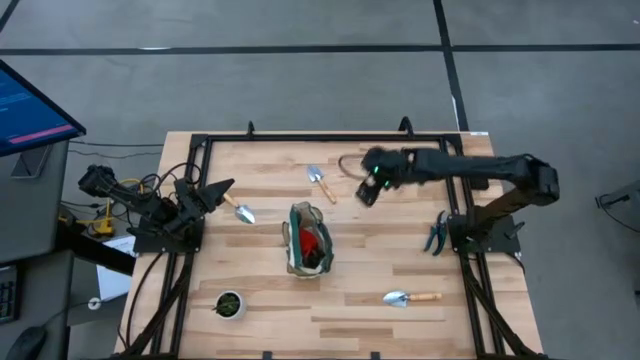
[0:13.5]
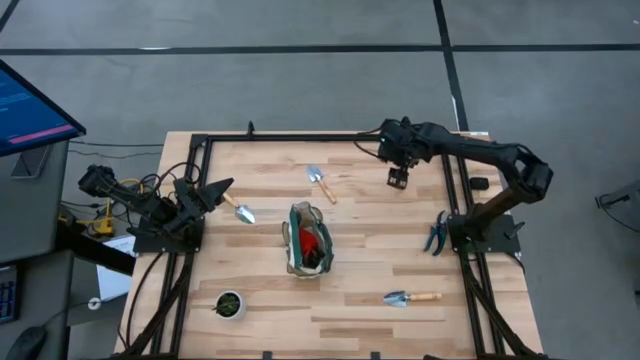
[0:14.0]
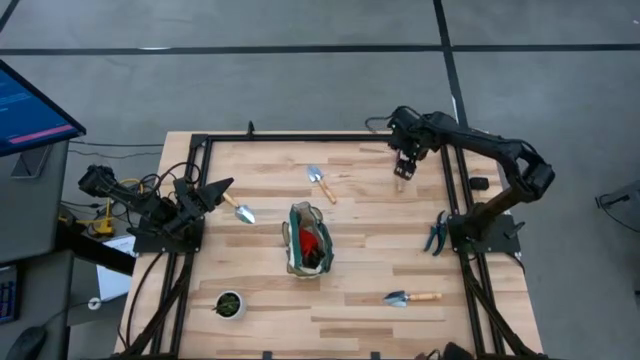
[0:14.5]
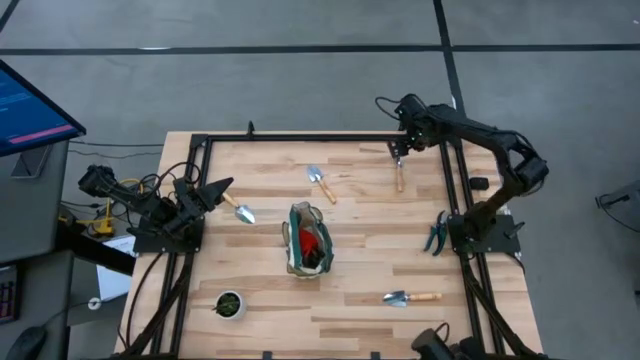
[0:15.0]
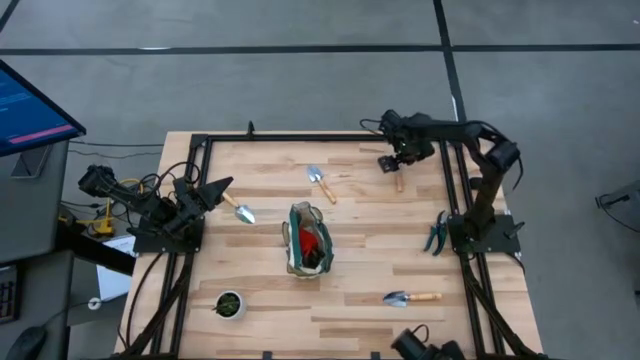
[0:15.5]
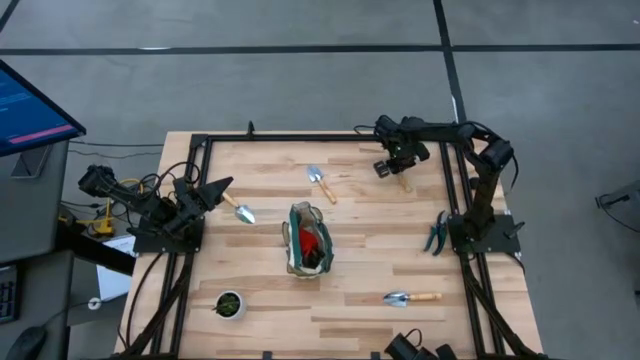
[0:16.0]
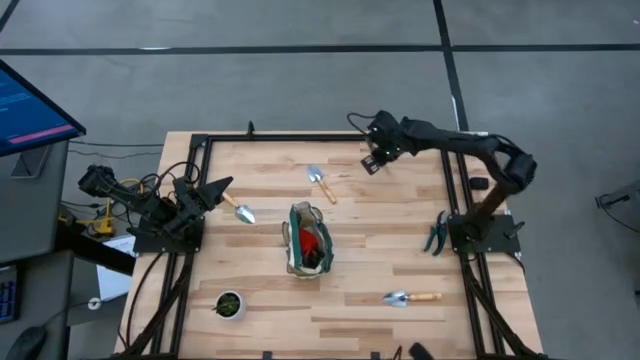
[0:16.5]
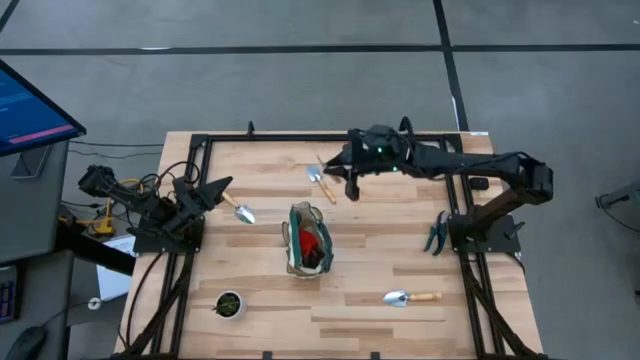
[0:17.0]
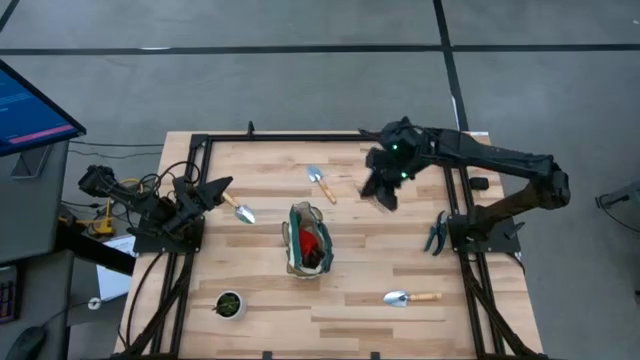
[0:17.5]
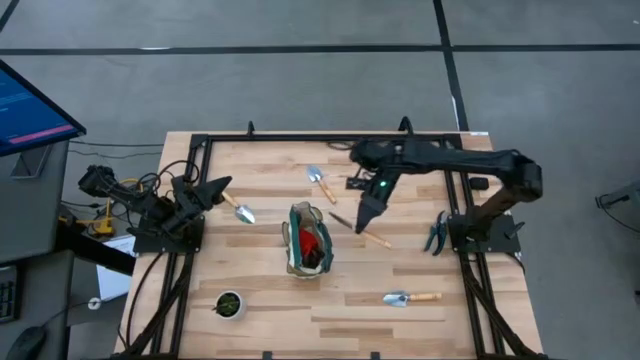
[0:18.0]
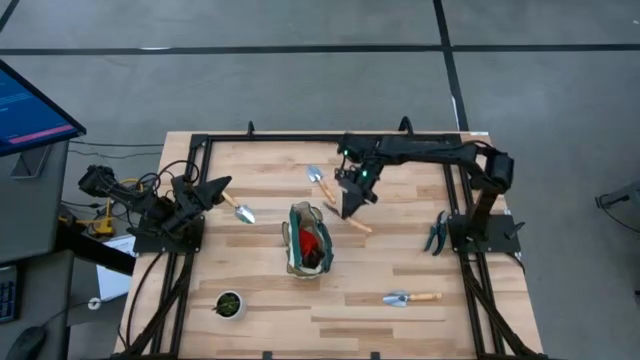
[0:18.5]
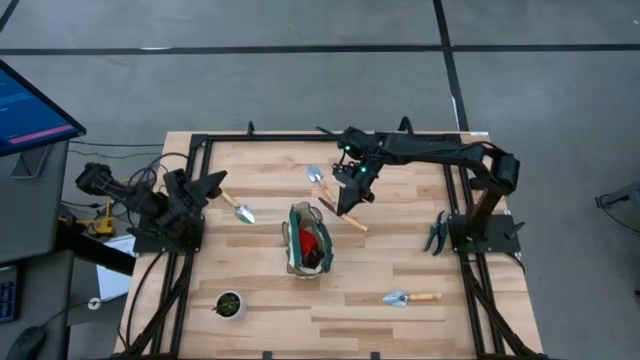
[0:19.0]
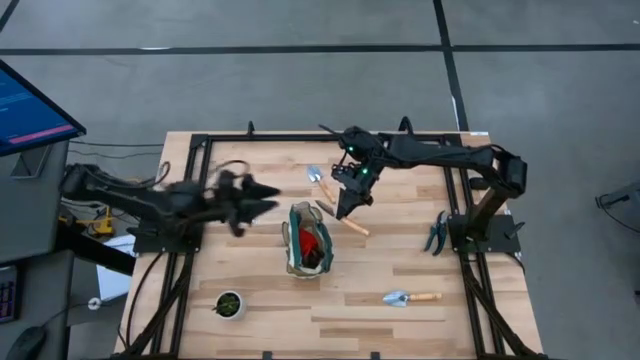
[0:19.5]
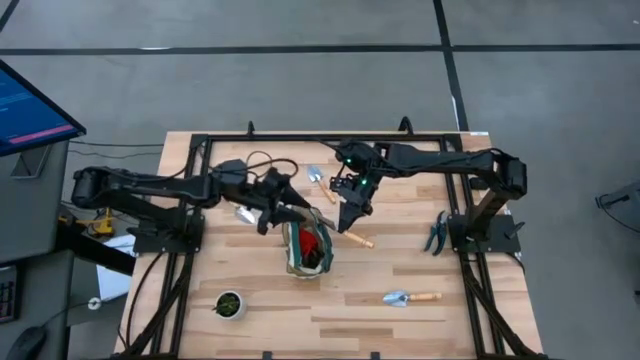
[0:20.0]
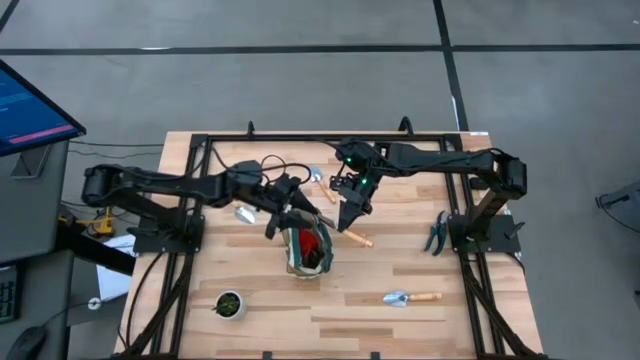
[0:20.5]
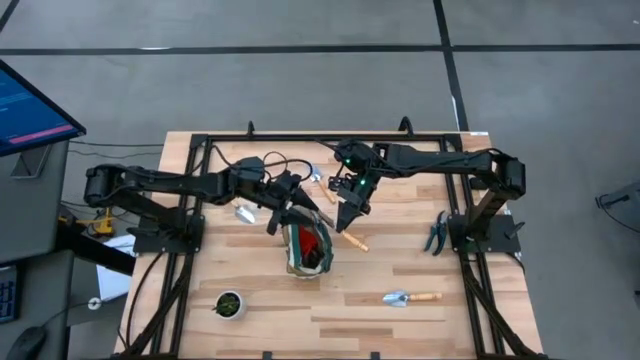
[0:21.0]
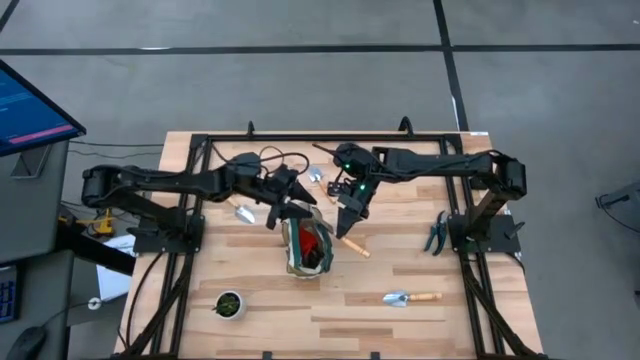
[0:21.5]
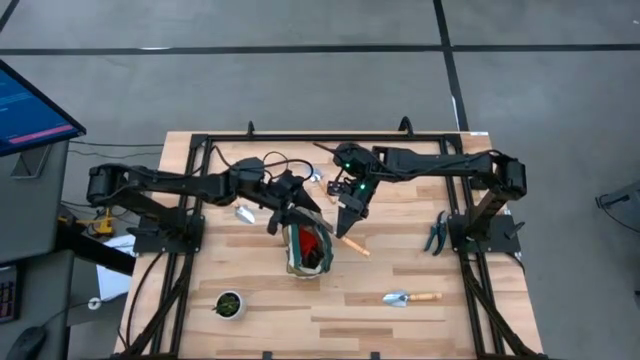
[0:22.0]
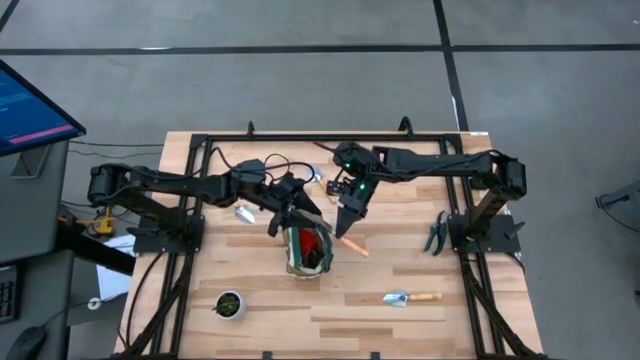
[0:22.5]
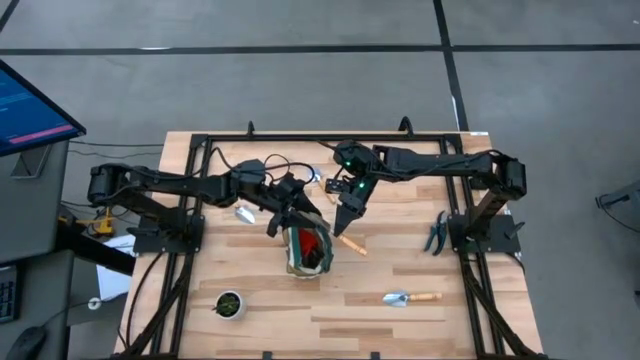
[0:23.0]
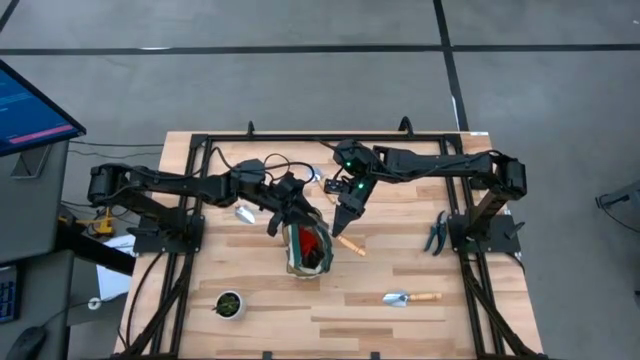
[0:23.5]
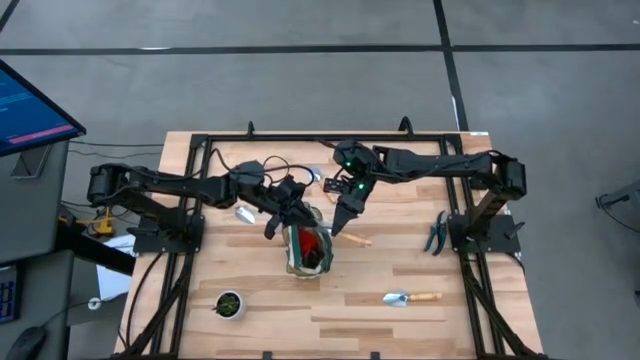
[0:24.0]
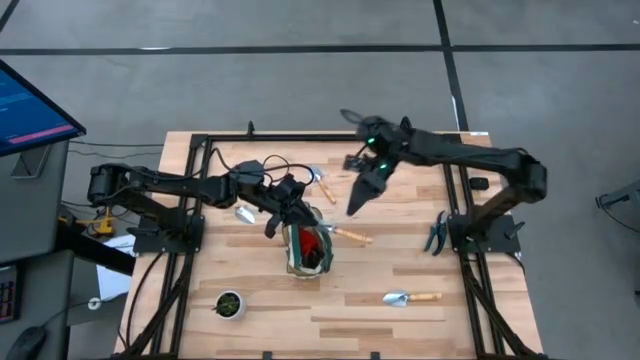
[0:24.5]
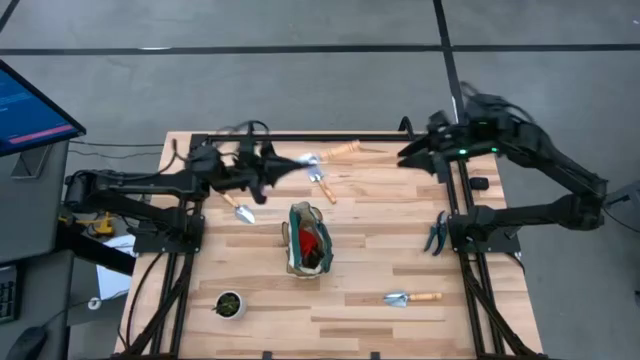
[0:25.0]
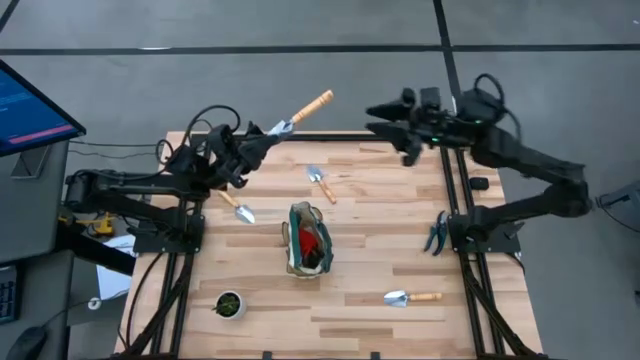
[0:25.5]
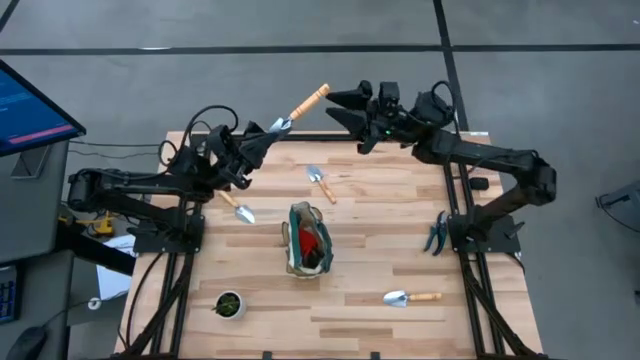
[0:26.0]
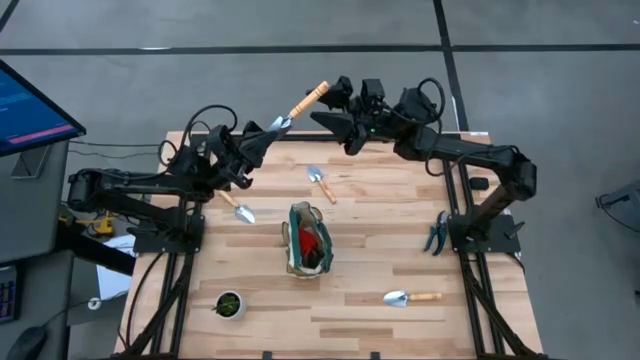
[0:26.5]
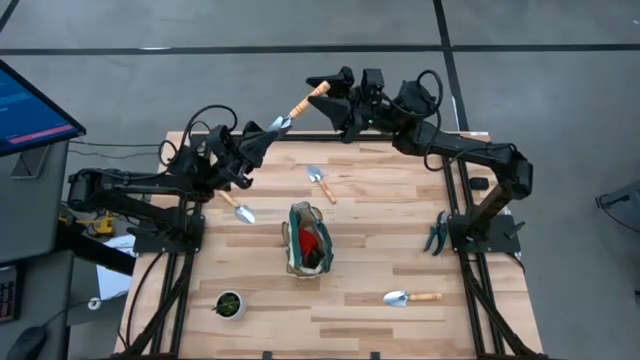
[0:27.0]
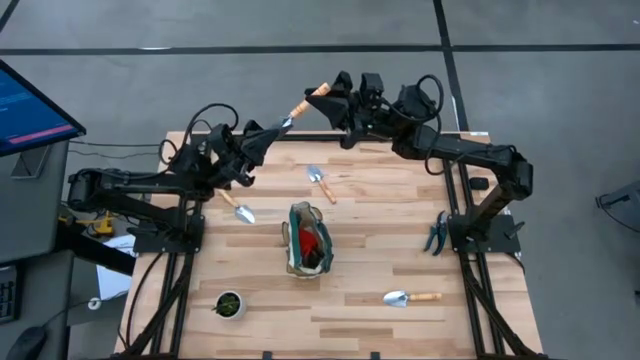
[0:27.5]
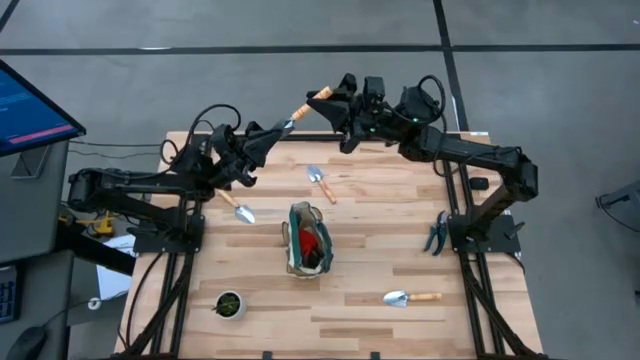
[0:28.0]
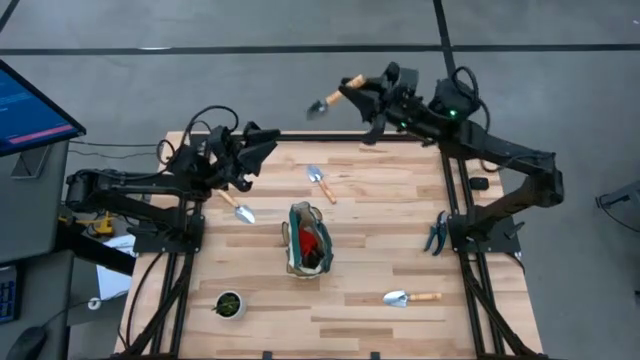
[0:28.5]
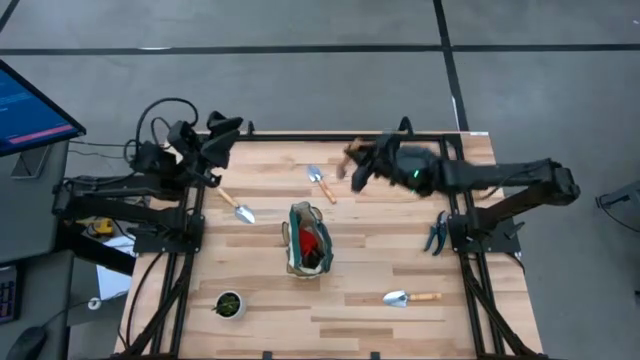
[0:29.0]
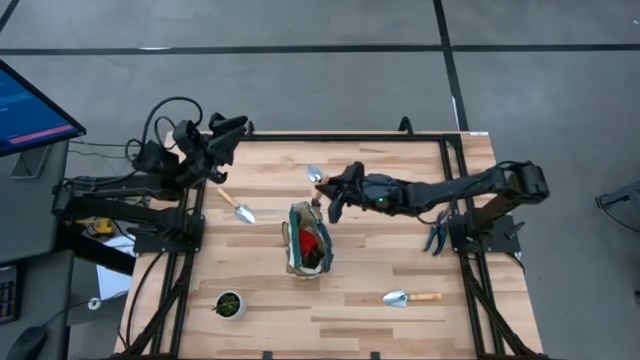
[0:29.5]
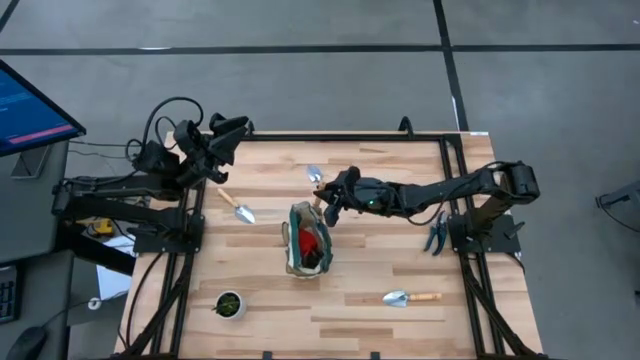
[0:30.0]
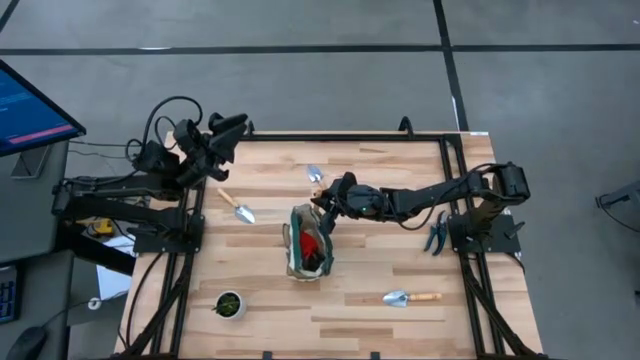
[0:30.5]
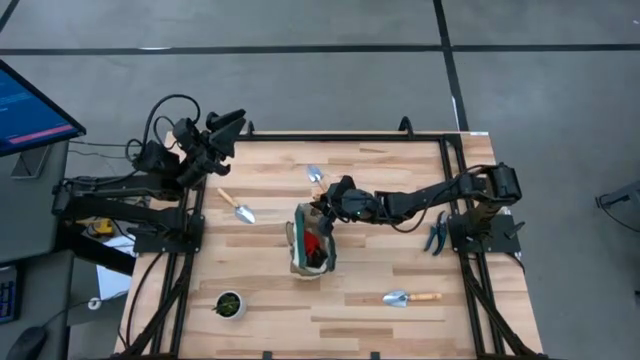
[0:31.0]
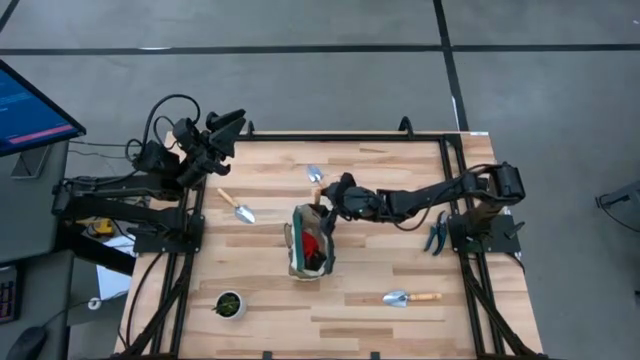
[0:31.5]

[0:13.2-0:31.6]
Task: Pick & Place Garden tools in Gardening bag
Put the brown trowel into the green gardening bag

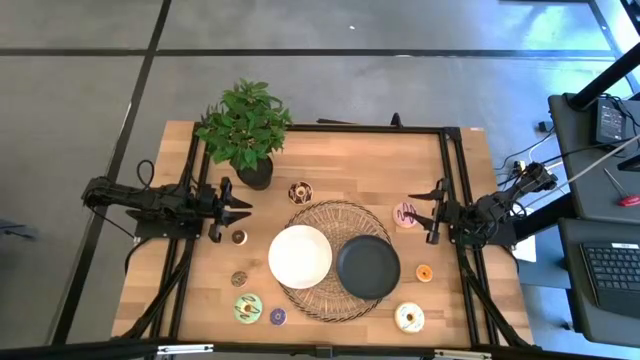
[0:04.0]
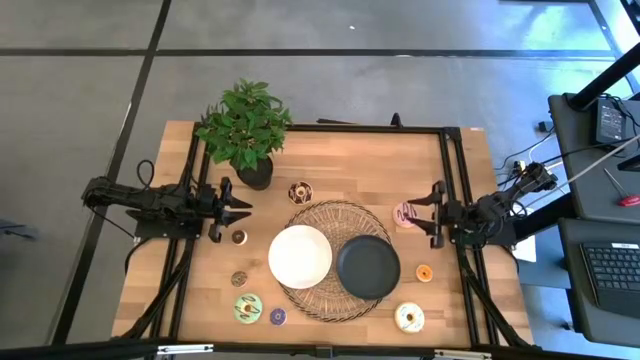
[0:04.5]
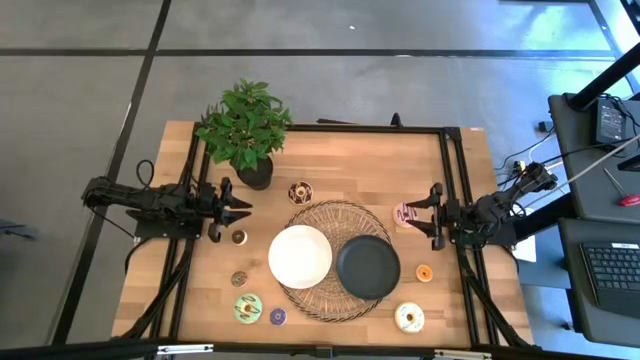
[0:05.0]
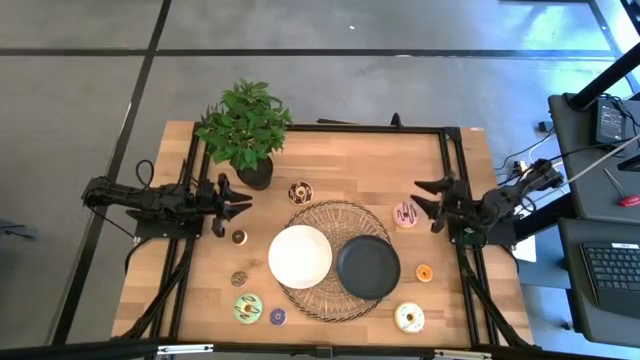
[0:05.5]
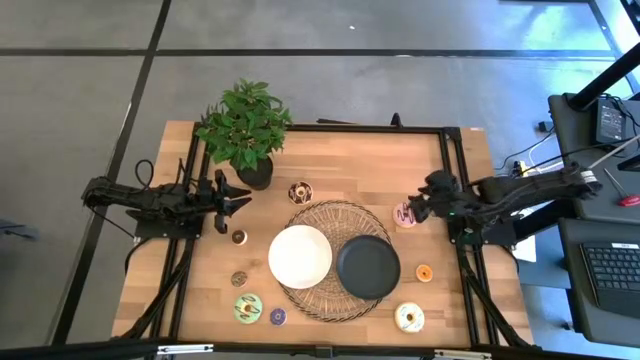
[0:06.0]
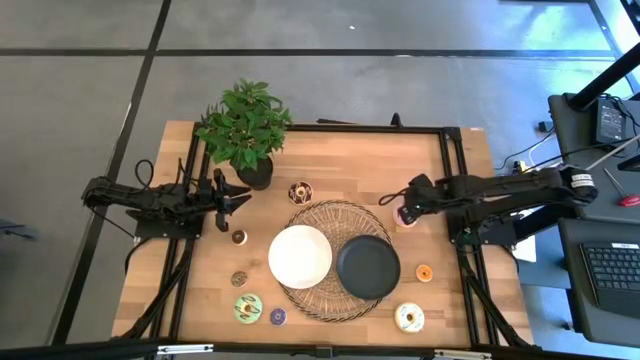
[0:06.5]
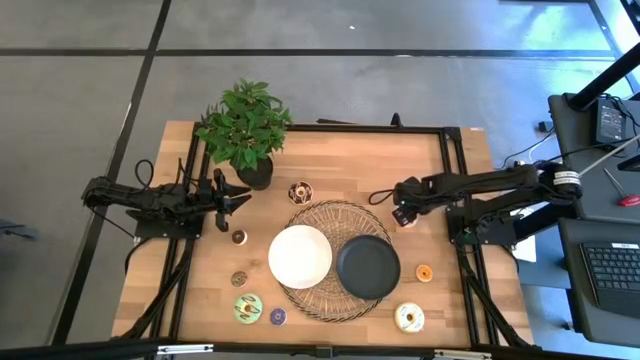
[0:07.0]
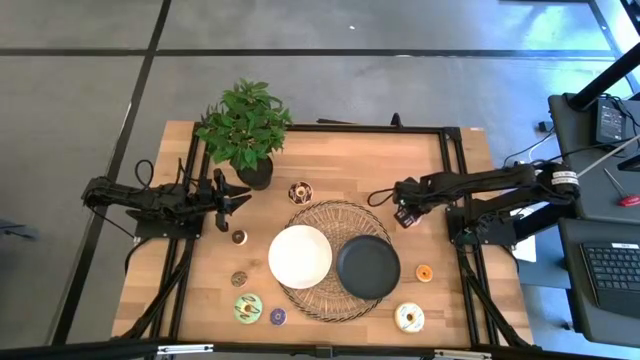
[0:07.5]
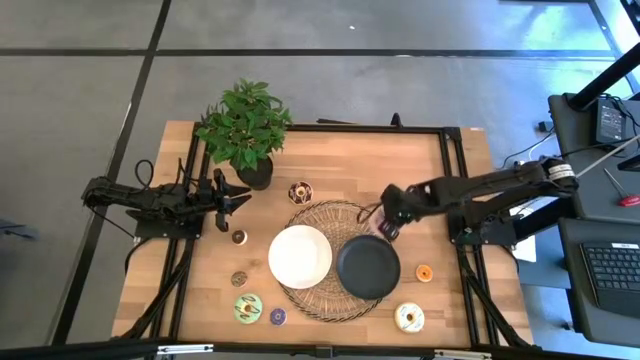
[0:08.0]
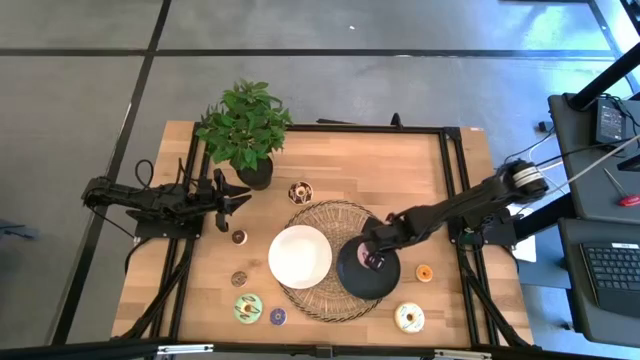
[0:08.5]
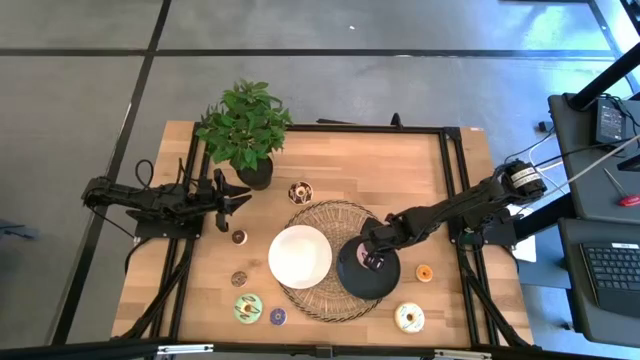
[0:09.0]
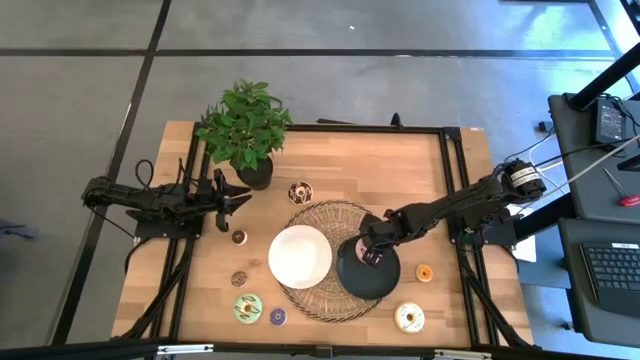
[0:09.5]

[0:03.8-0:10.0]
Task: Pick & Place donuts
Put the large pink donut on the black plate
